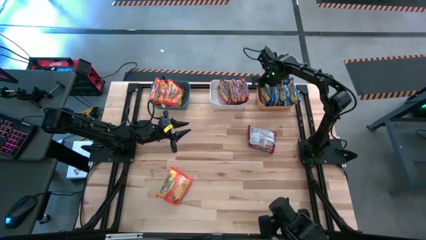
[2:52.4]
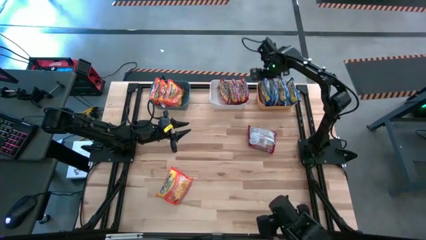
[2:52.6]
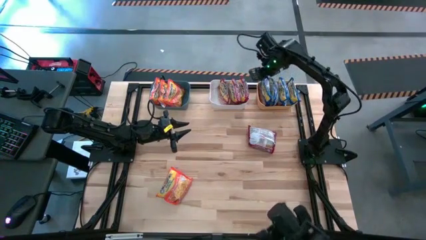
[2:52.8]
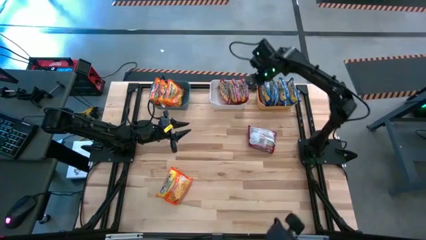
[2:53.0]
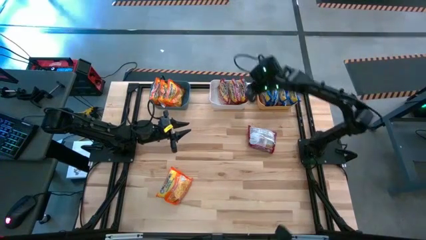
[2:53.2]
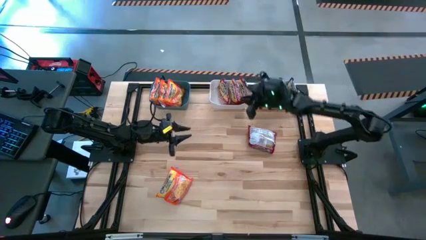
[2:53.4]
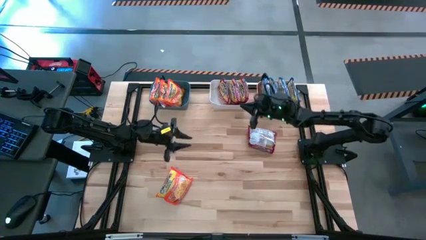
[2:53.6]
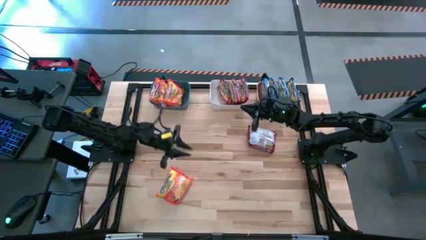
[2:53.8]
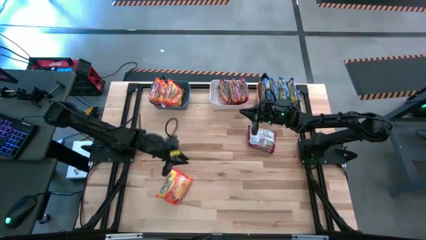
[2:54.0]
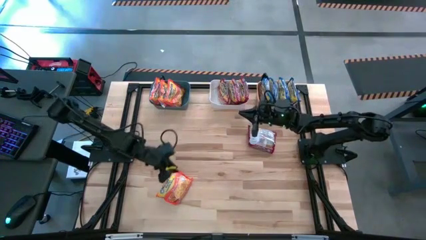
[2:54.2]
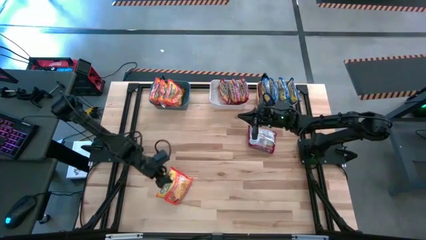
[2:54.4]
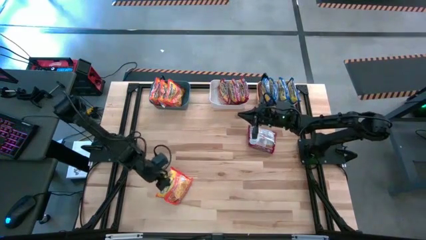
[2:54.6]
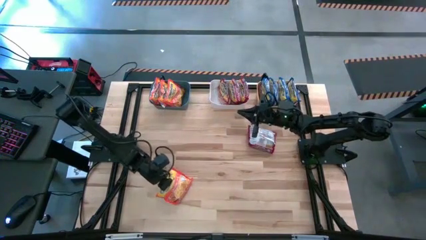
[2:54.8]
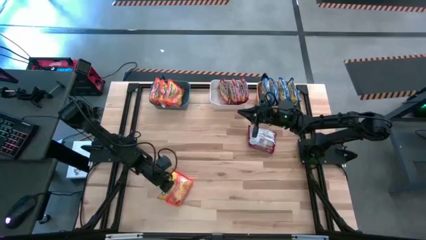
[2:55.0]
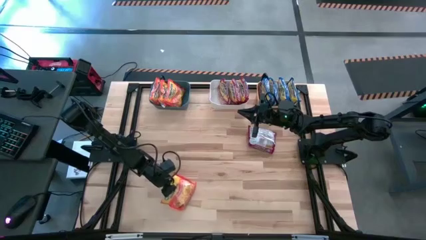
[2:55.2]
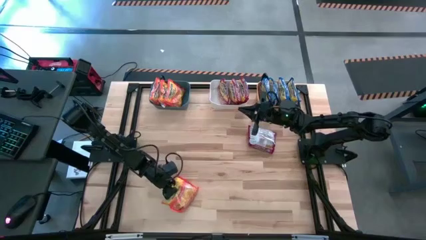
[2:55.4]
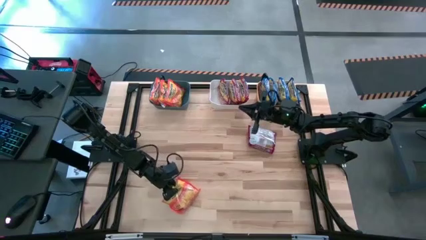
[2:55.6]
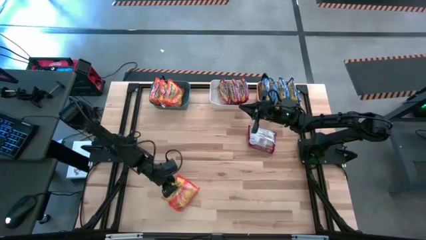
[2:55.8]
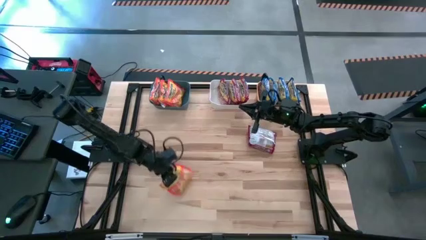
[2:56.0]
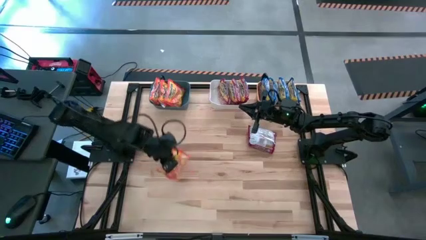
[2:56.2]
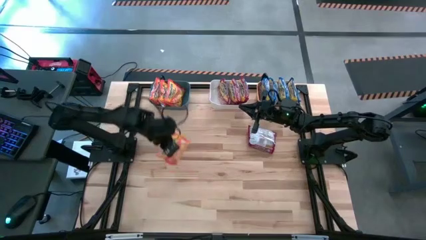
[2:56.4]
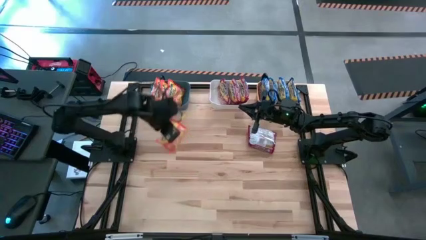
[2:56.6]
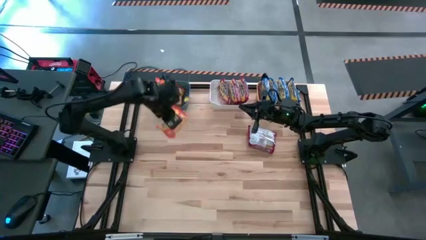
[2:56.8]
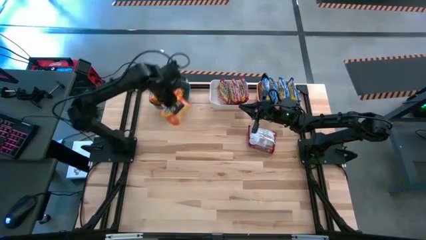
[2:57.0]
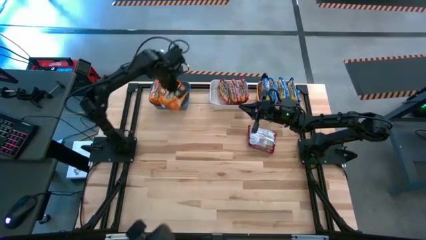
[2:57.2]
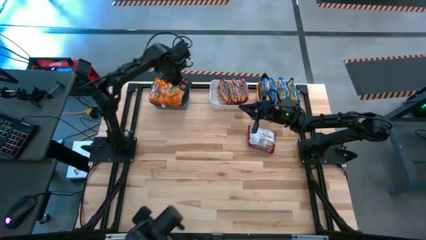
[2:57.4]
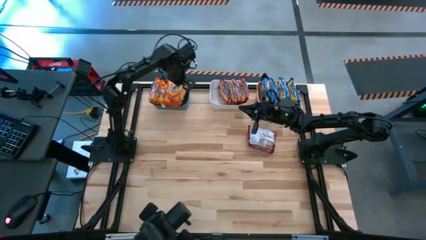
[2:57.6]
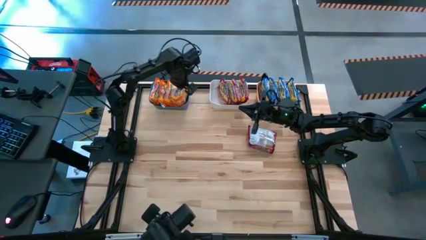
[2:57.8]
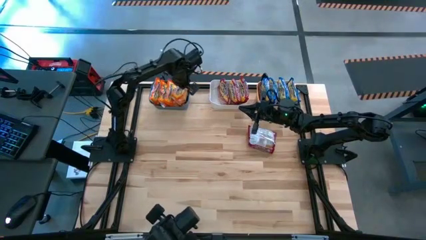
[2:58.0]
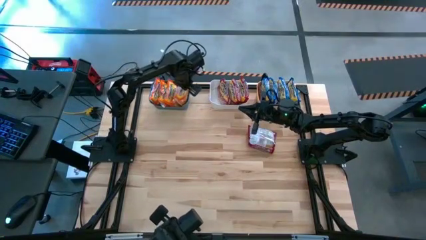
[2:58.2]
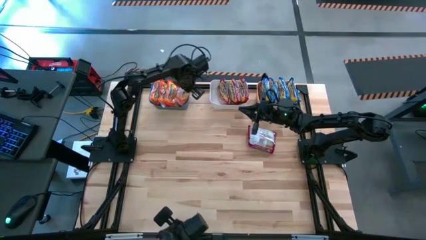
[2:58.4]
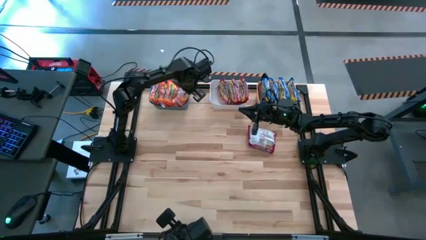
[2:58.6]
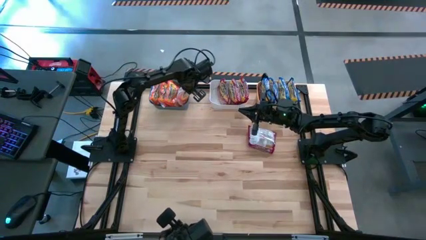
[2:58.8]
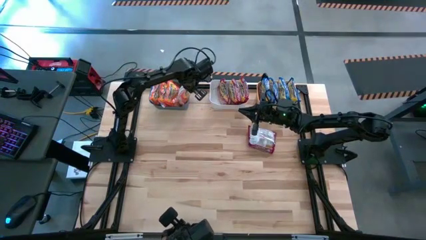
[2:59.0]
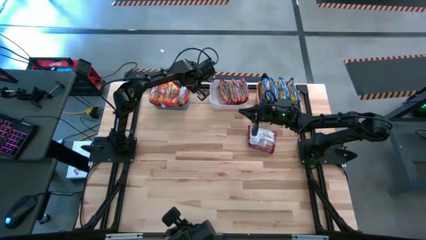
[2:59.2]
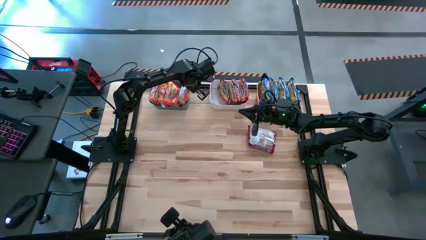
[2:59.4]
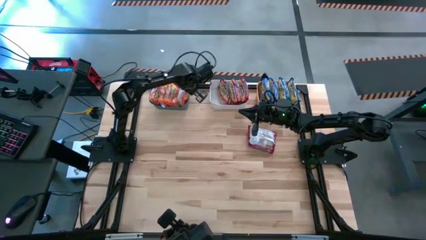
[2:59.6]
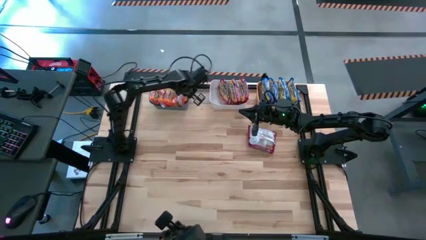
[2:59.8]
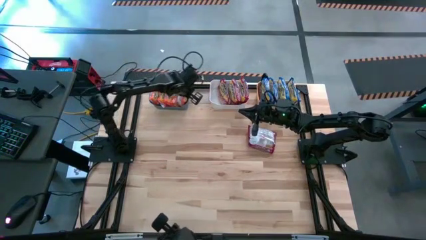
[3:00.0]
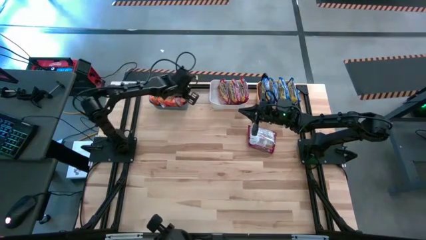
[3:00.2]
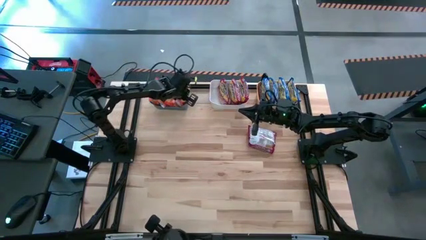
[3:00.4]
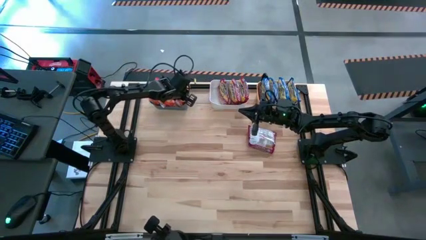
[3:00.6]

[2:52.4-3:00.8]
Task: Sort Maruchan noodles
Put the orange noodle pack into the blue bin

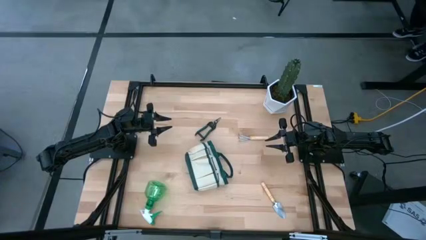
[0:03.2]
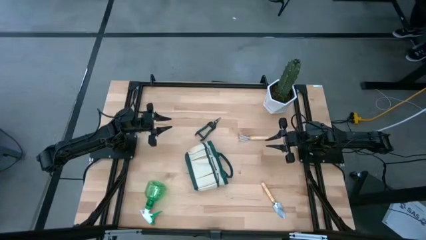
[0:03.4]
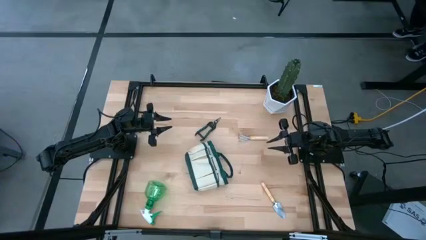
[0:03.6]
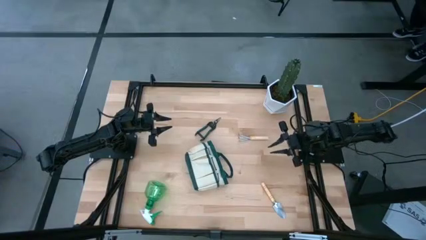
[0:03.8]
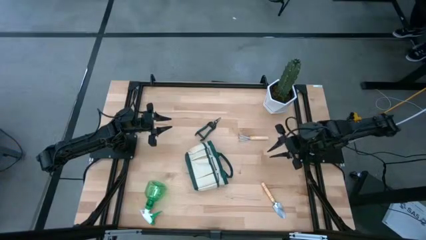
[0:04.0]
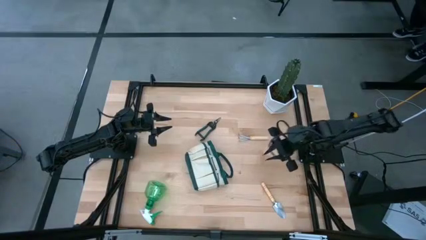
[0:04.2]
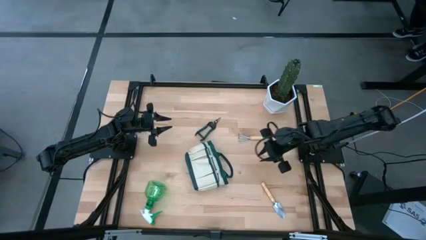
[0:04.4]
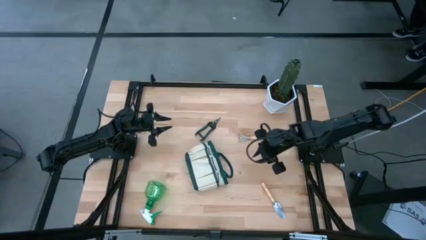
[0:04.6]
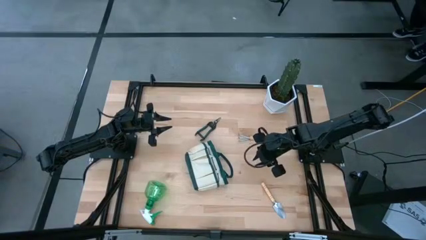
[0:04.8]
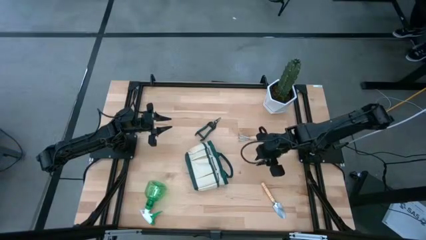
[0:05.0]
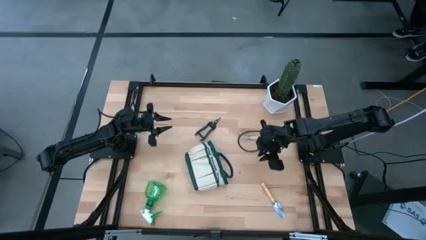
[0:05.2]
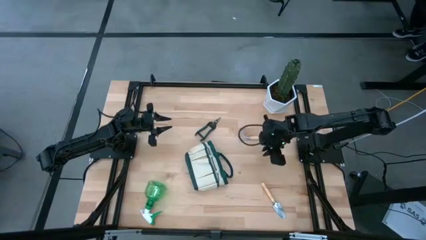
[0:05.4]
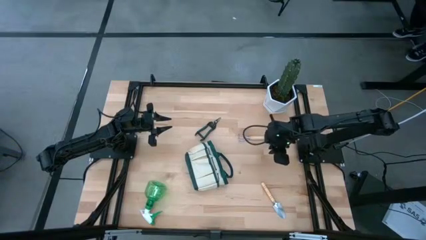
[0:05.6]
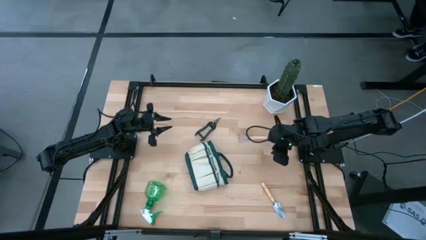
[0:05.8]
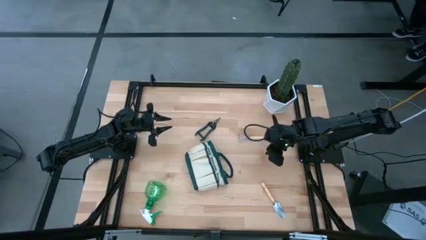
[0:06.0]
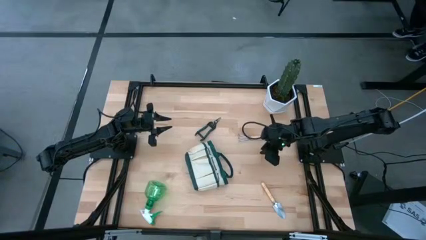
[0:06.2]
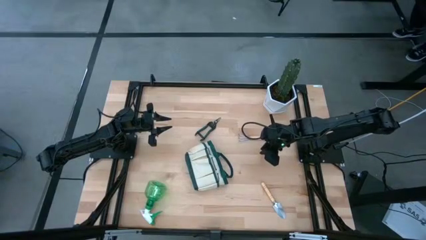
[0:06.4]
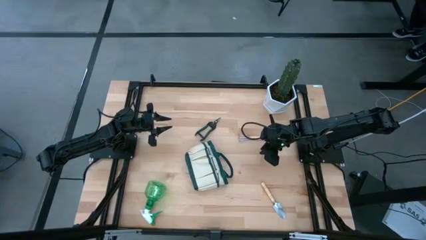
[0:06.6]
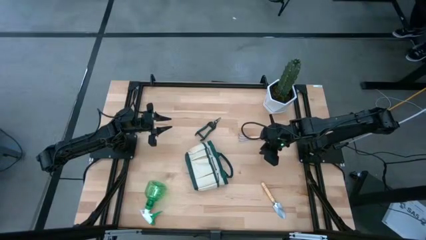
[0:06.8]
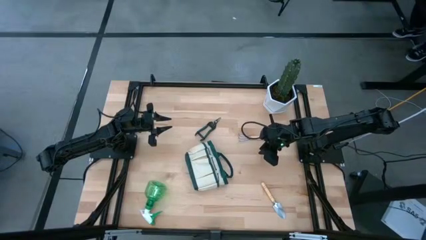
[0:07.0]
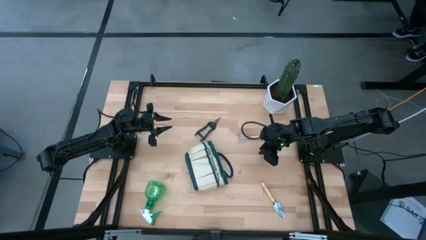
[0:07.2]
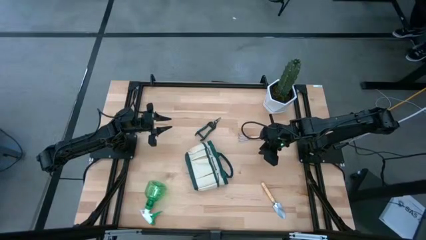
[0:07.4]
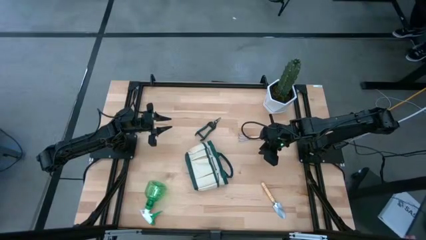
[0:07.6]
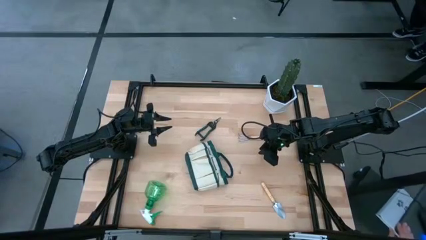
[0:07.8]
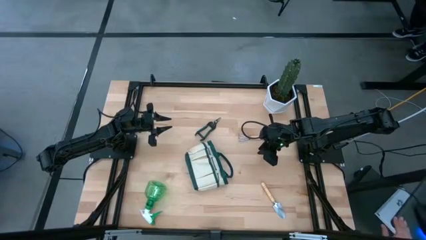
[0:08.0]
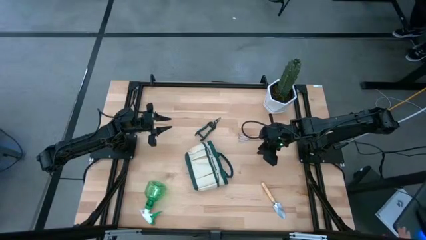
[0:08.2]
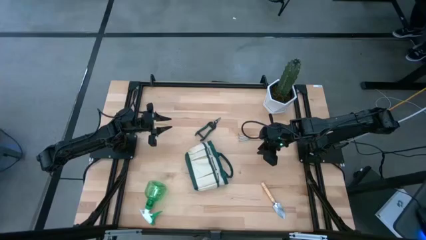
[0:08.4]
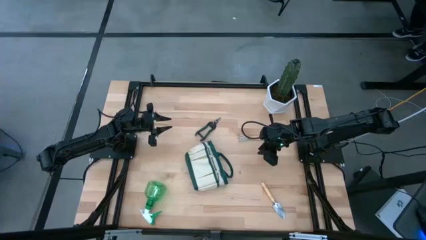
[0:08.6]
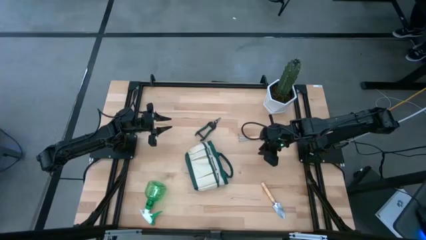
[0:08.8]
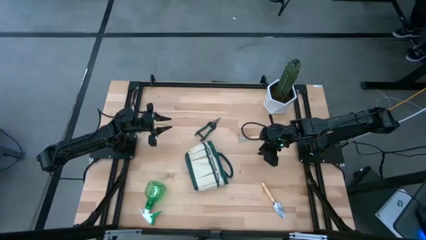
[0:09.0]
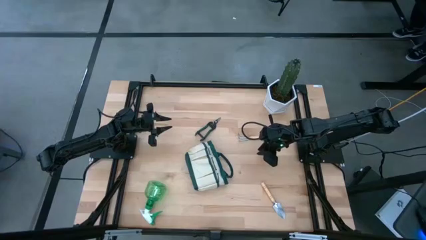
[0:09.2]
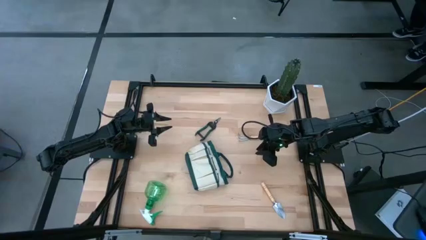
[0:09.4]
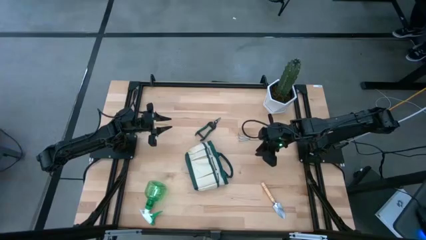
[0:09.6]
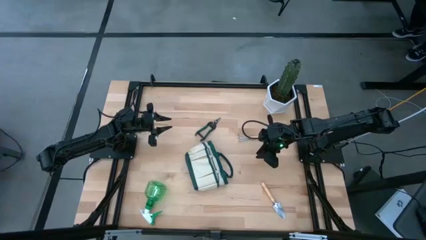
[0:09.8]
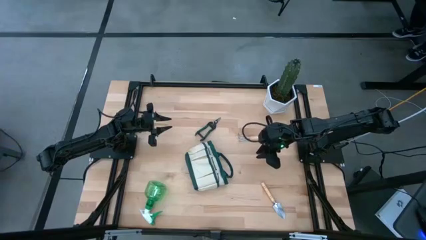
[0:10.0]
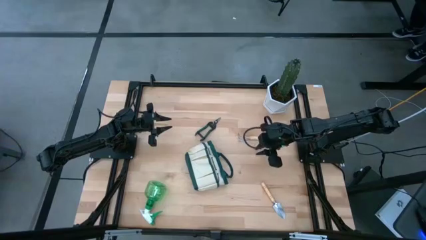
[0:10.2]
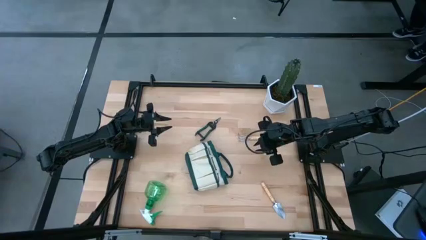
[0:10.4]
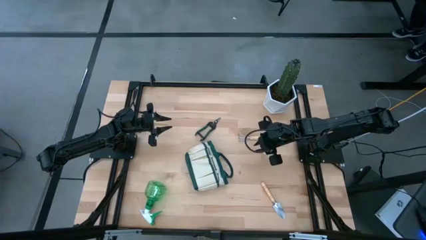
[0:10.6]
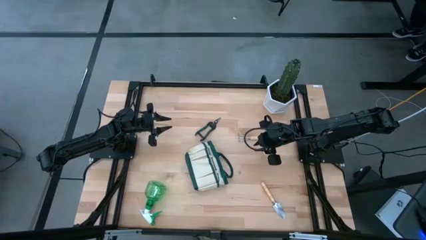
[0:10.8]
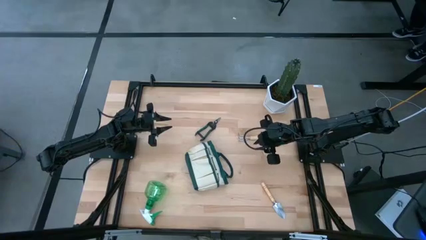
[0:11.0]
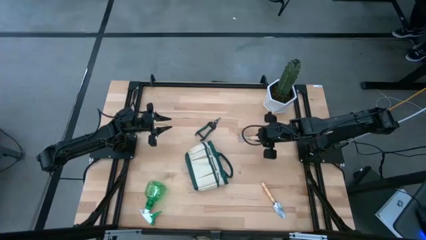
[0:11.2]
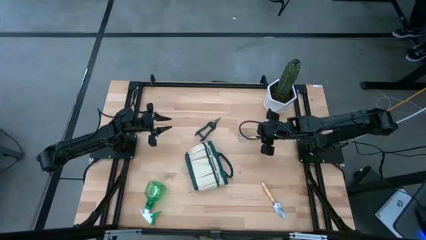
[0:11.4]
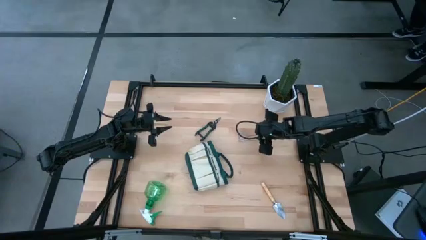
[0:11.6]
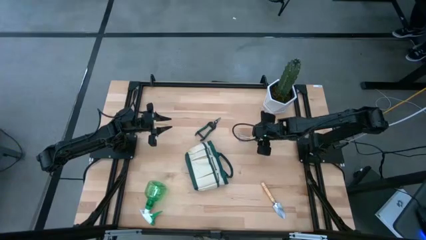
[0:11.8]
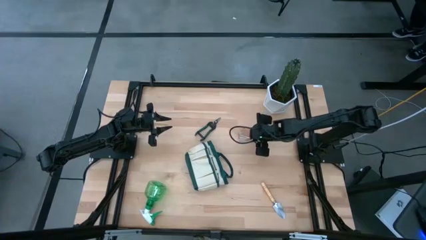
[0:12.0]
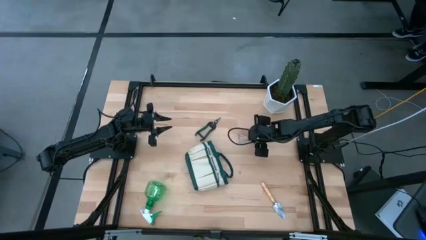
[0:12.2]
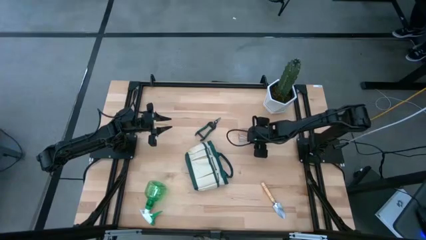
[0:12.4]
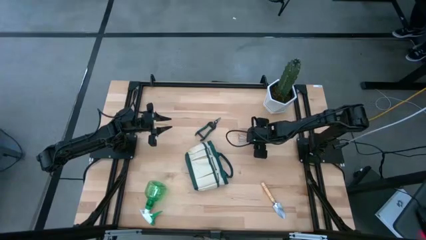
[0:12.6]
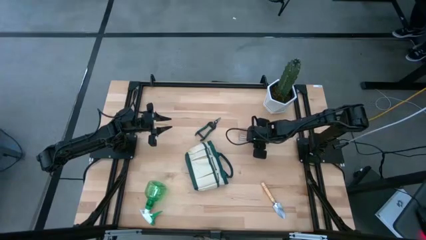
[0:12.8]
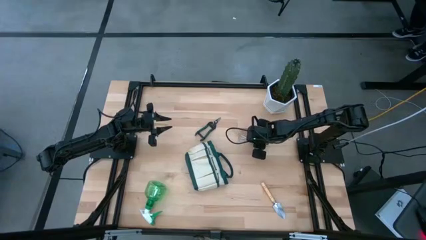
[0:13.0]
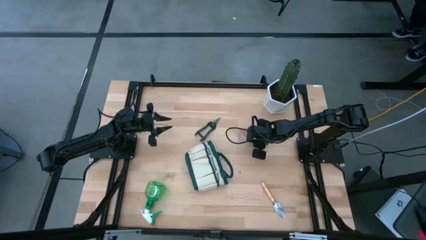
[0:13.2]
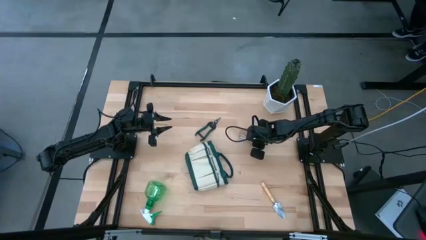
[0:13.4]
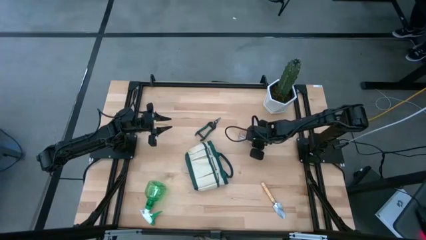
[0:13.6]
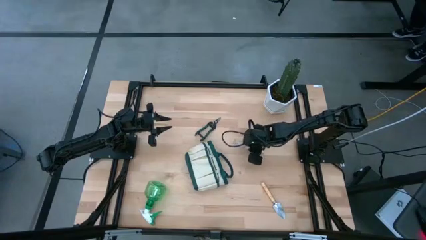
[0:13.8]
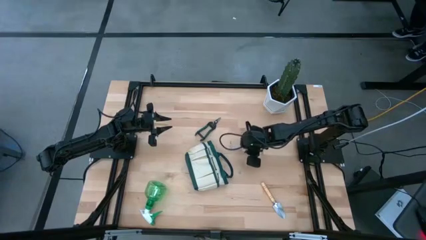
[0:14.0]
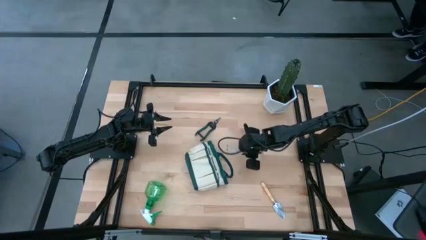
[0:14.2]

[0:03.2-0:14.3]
Task: Pick & Place Garden tools in Gardening bag
Put the brown hand rake into the gardening bag
